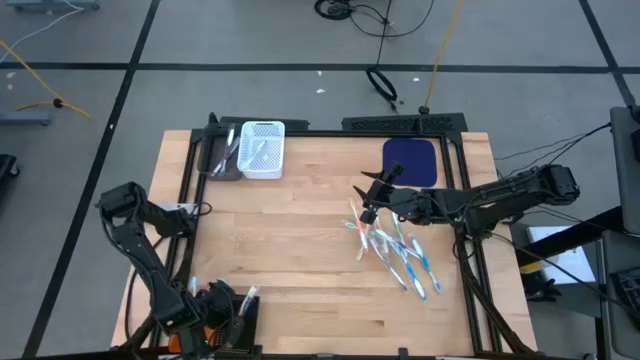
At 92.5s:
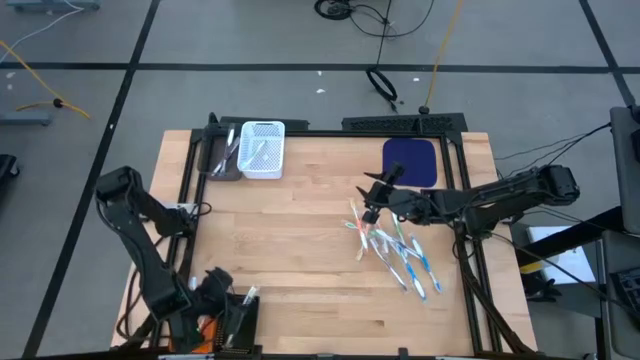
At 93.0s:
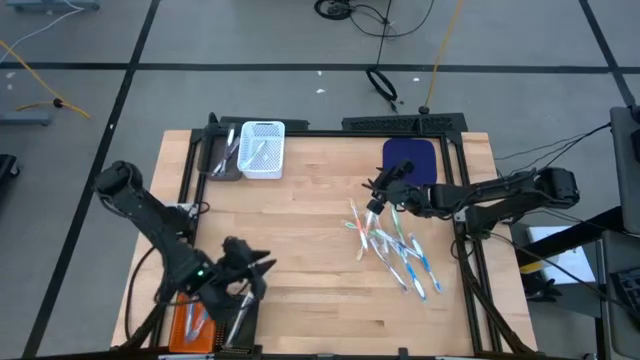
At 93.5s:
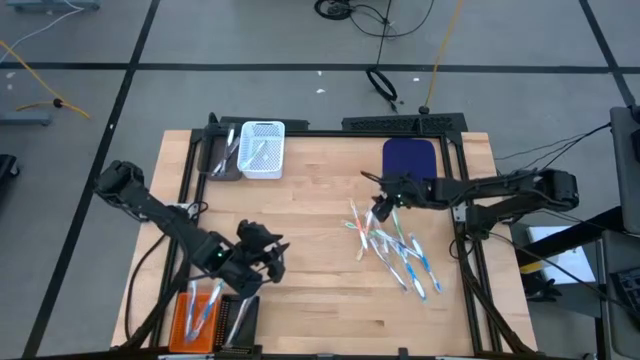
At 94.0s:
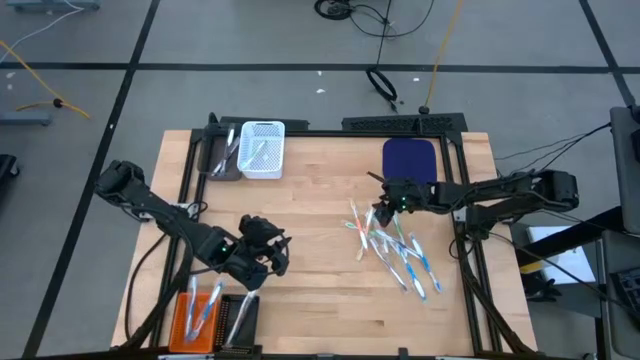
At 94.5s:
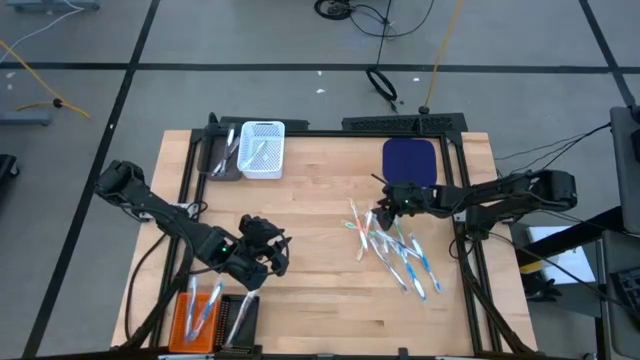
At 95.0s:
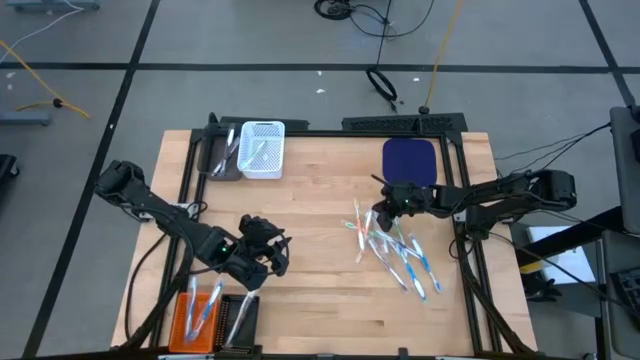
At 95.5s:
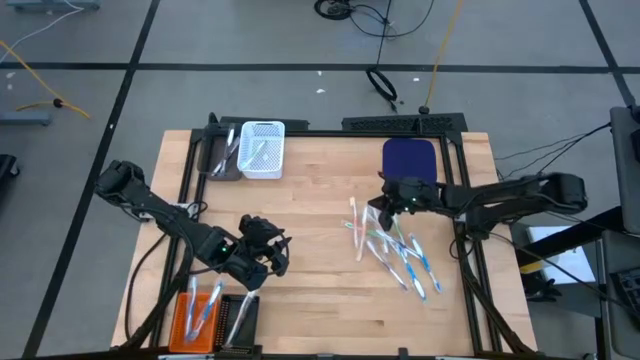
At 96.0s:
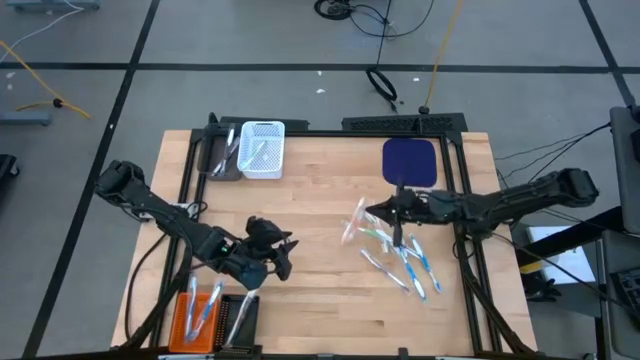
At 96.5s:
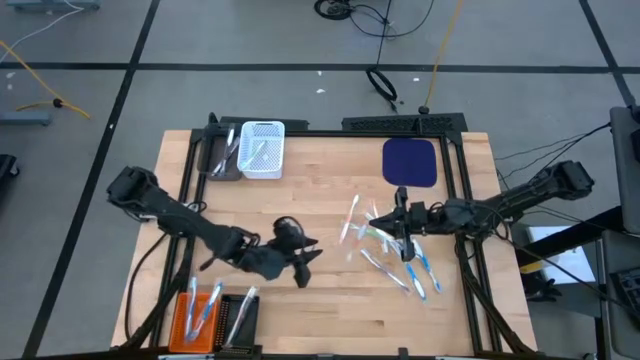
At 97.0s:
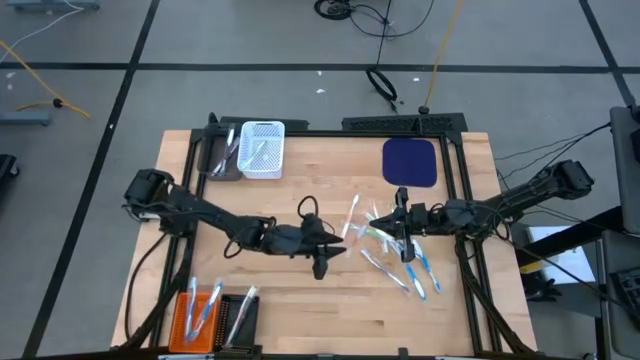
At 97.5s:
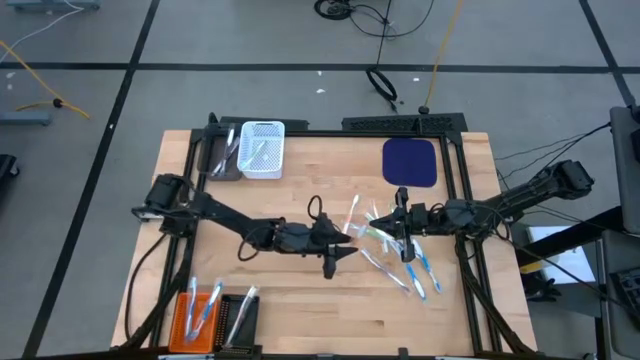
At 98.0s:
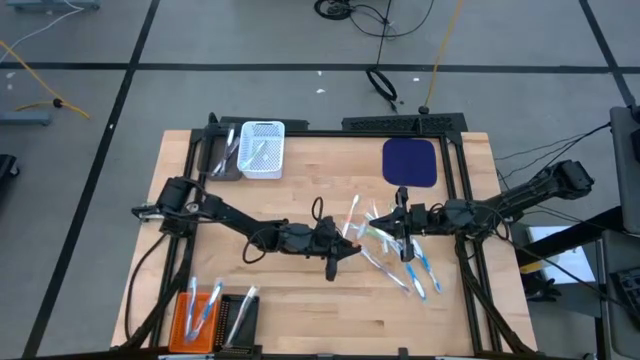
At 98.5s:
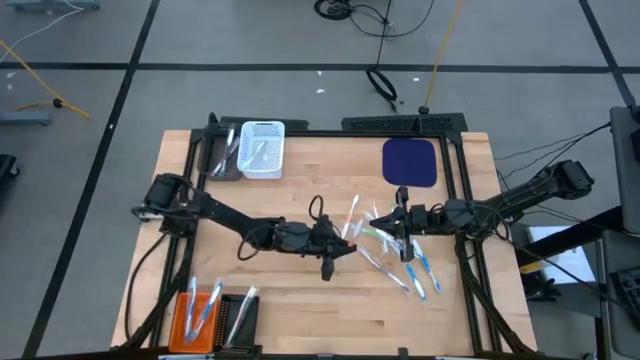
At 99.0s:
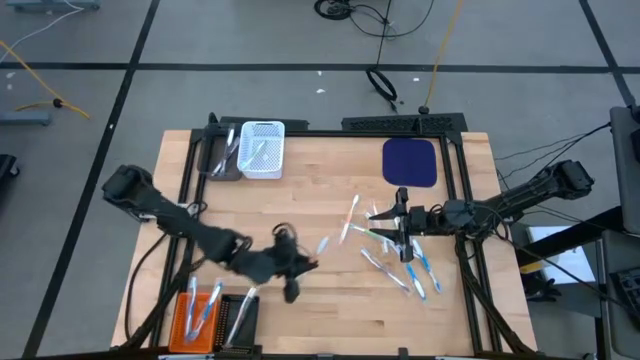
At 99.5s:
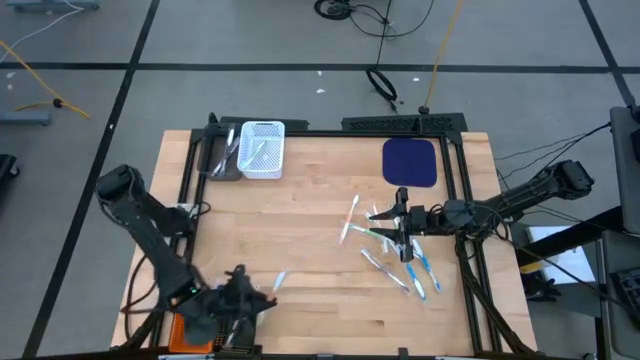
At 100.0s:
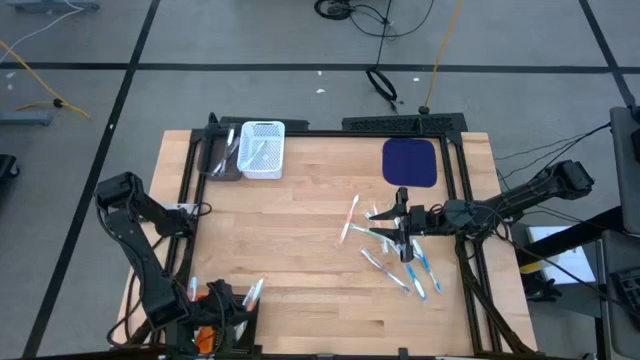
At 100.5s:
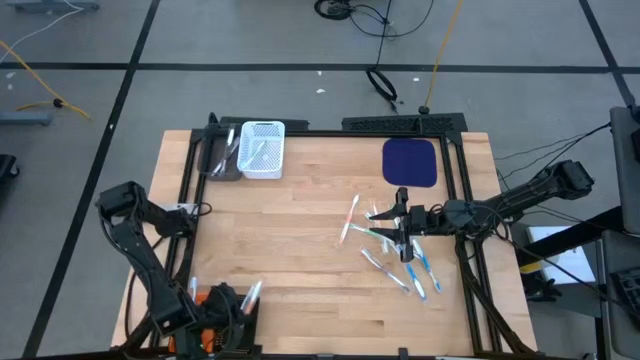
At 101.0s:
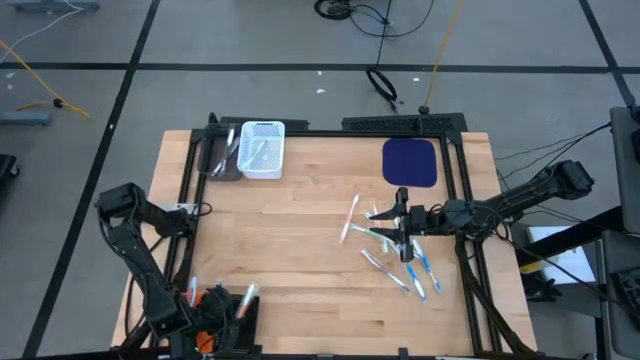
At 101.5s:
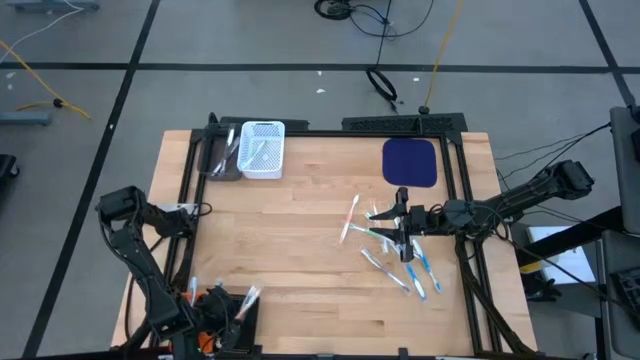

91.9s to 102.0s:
Task: Pick & Place Toothbrushes
Put the orange toothbrush into the black bin

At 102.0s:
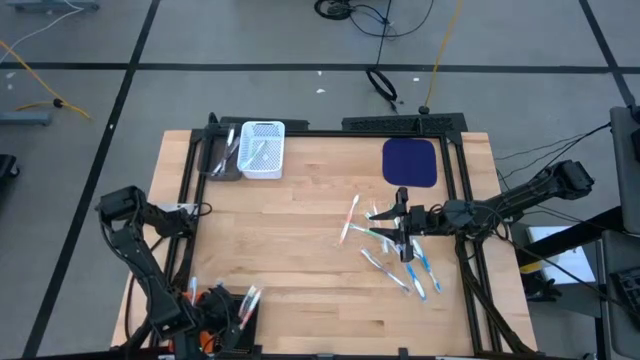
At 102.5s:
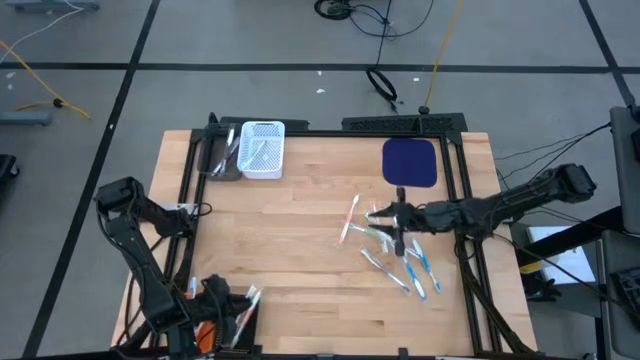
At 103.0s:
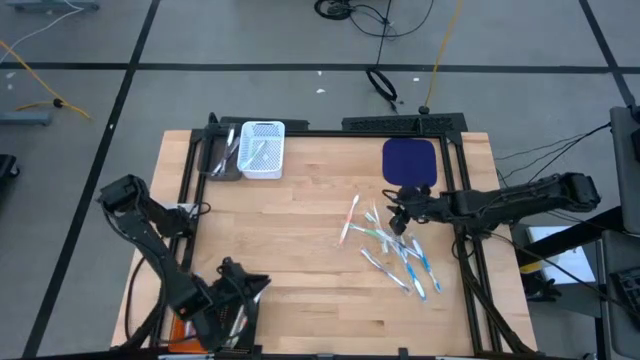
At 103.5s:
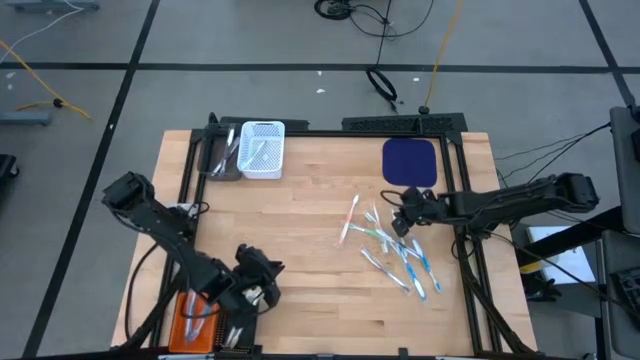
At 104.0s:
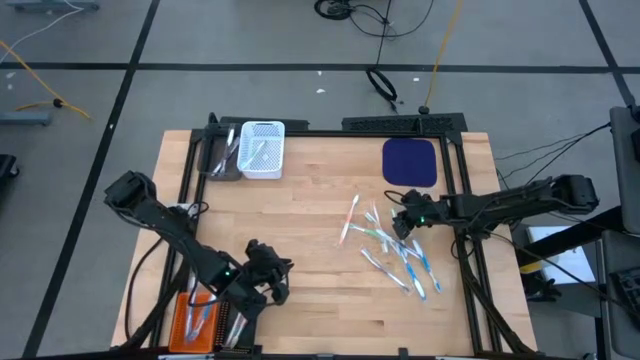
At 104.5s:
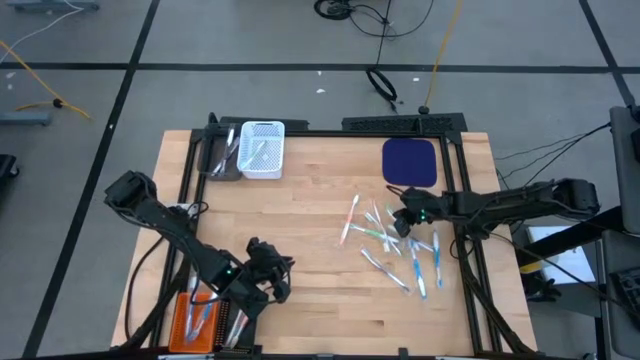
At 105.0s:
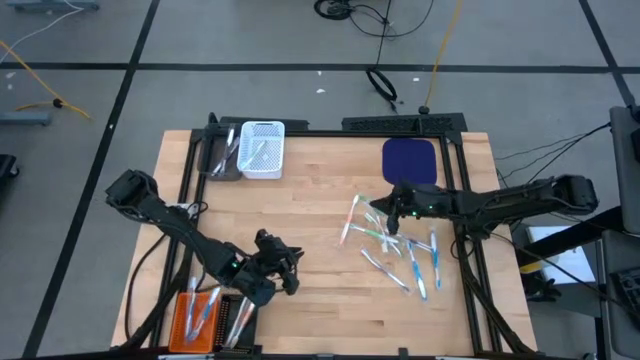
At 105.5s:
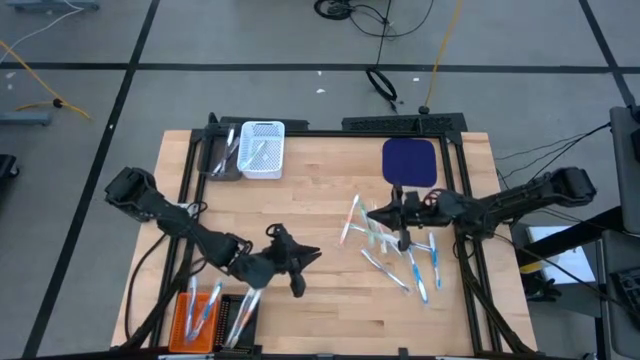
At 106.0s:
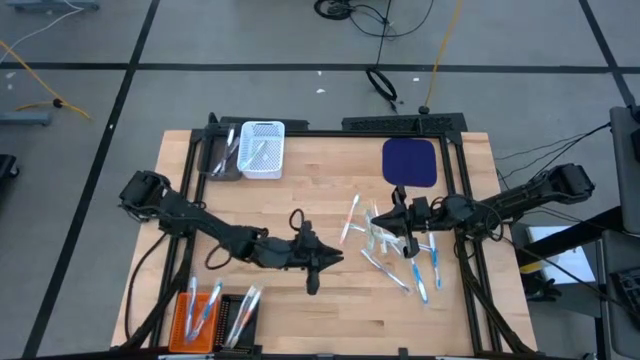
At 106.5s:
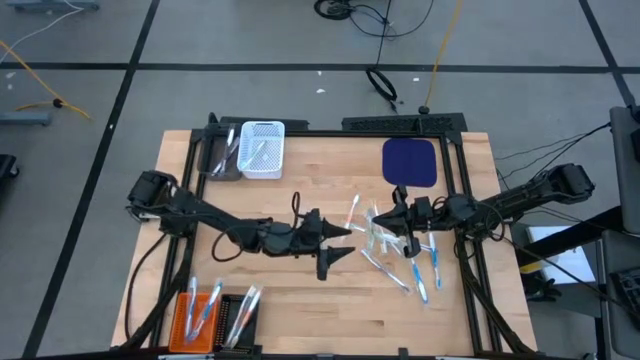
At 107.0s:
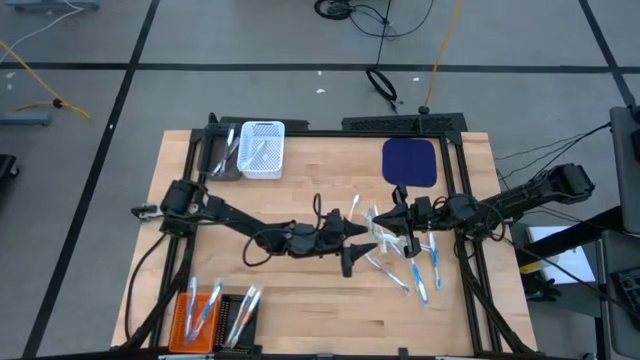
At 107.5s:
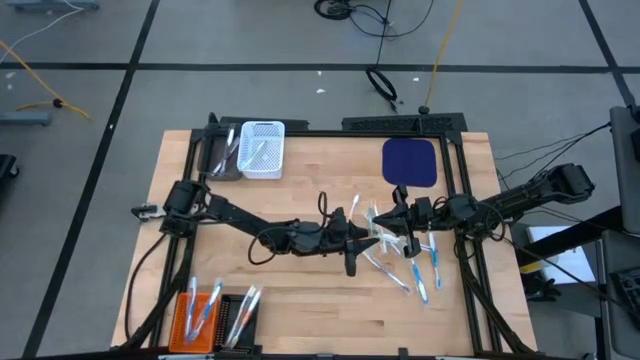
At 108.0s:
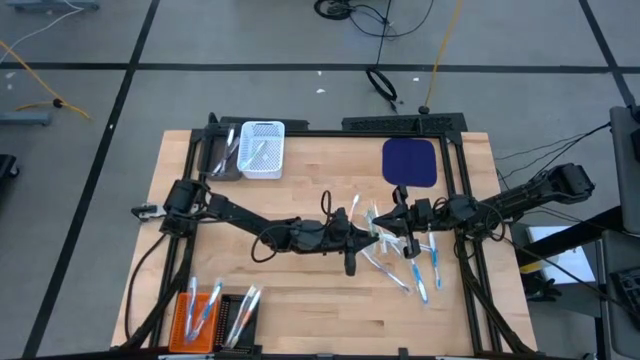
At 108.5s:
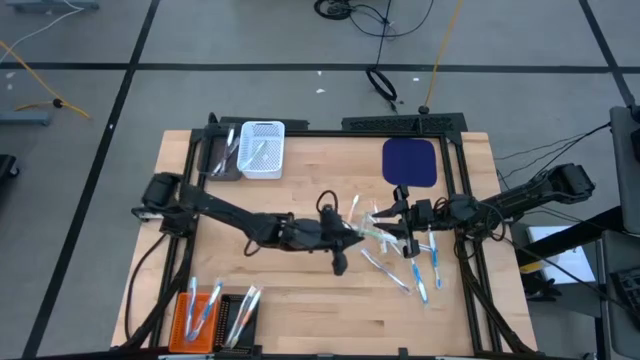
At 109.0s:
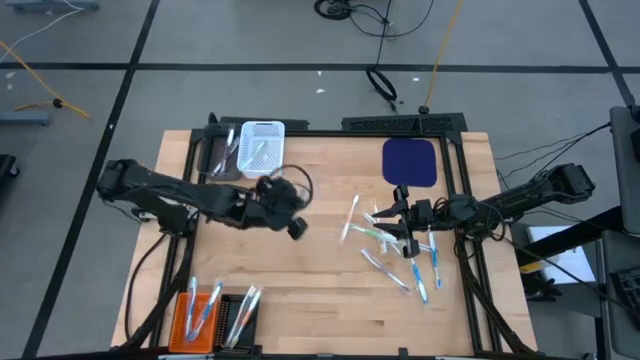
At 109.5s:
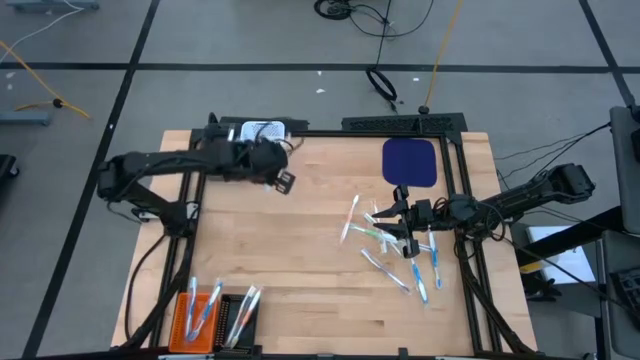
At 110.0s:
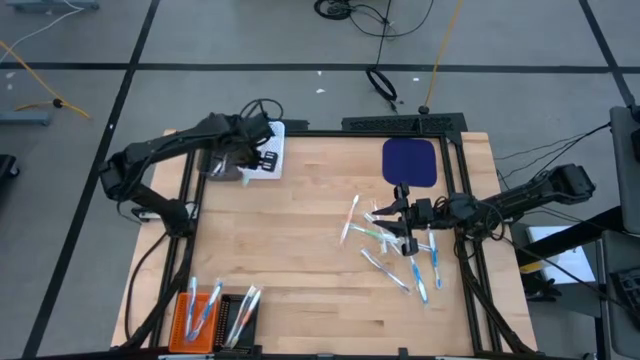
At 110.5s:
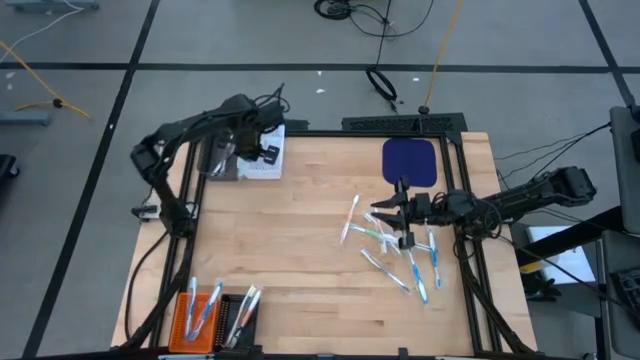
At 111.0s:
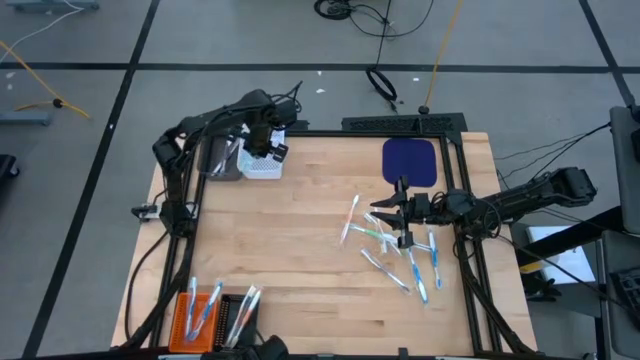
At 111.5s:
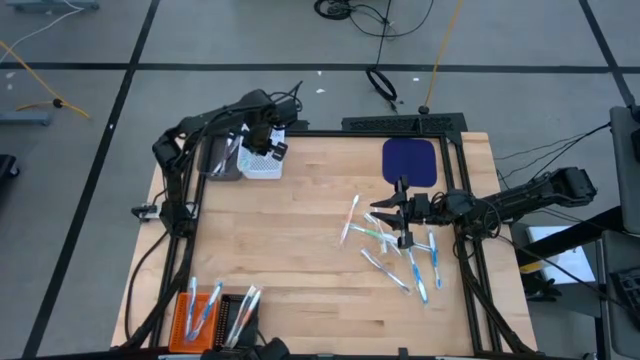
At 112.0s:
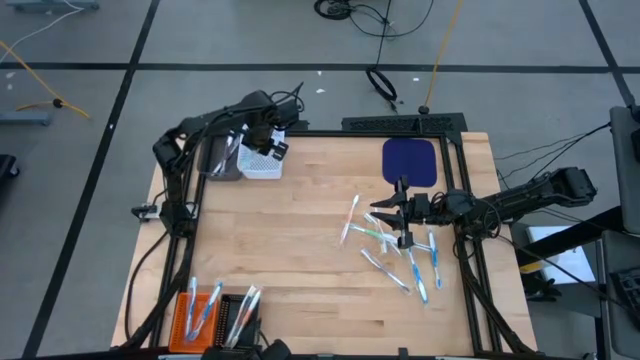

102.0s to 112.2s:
Put the green toothbrush into the white bin

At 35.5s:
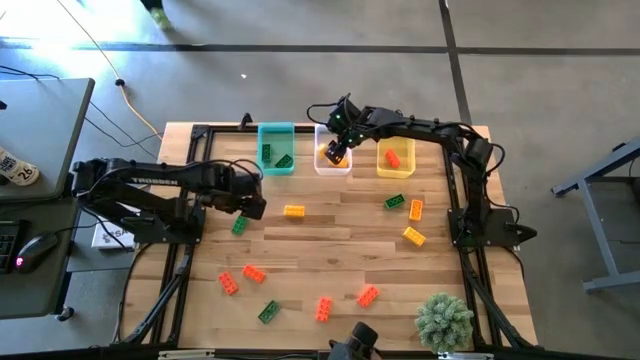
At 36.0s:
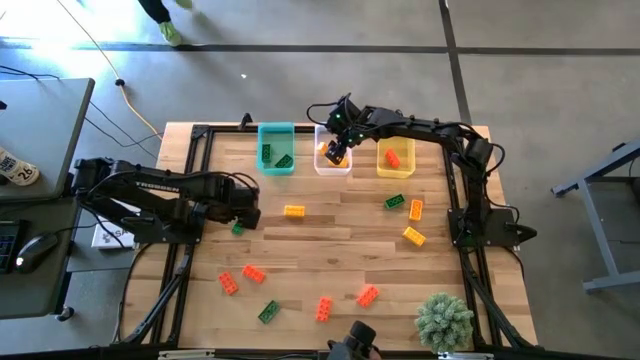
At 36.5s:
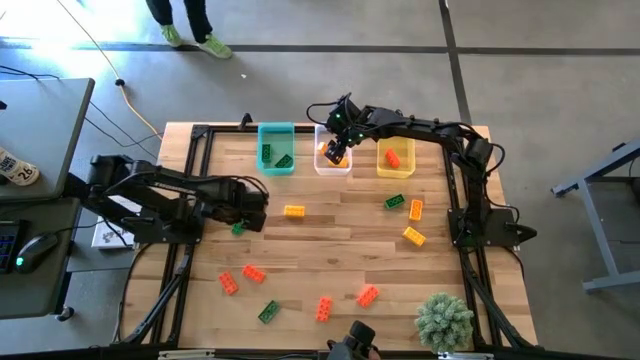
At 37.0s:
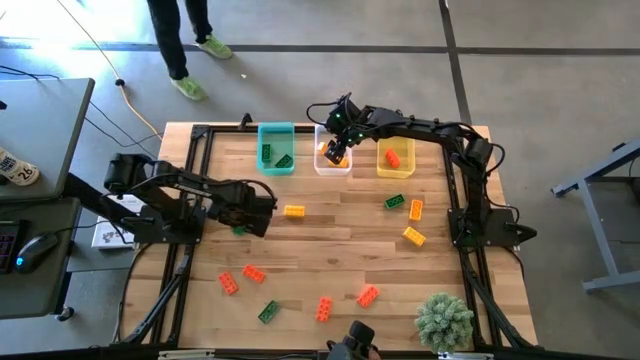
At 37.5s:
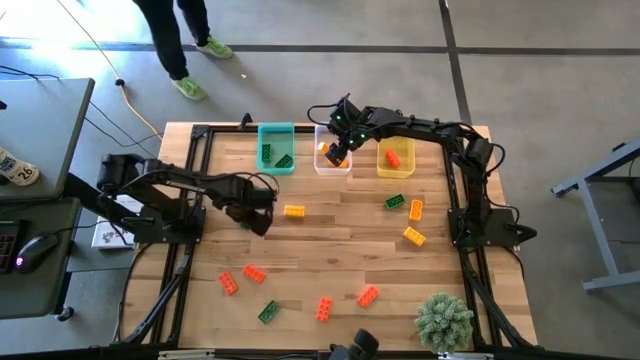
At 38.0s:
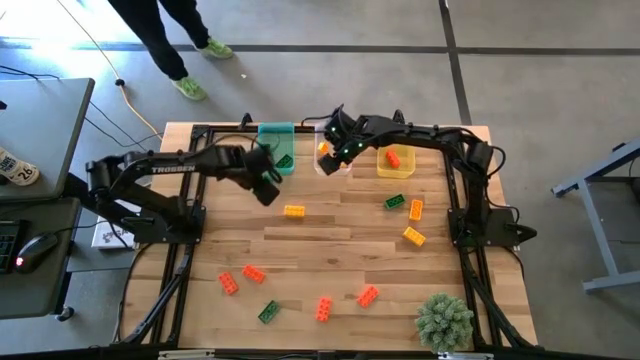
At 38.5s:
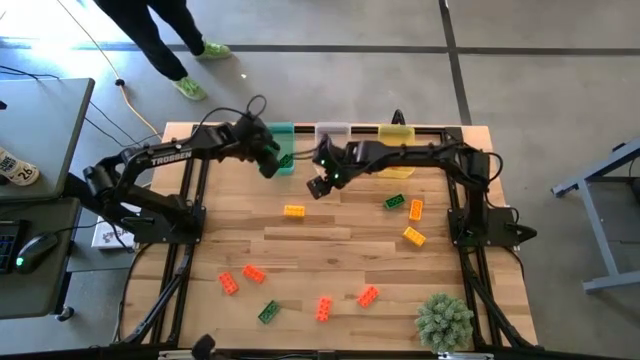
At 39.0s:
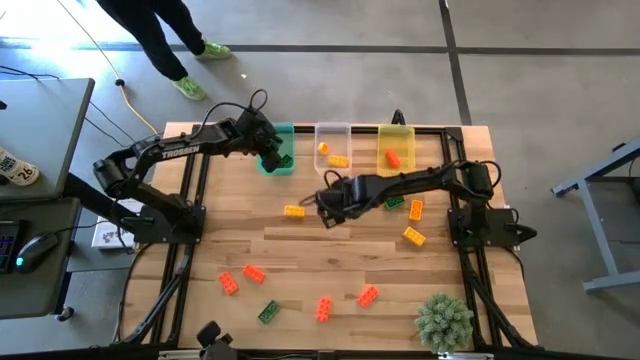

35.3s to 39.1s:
Task: Sort & place blocks by color
Put the green game piece into the green bin
